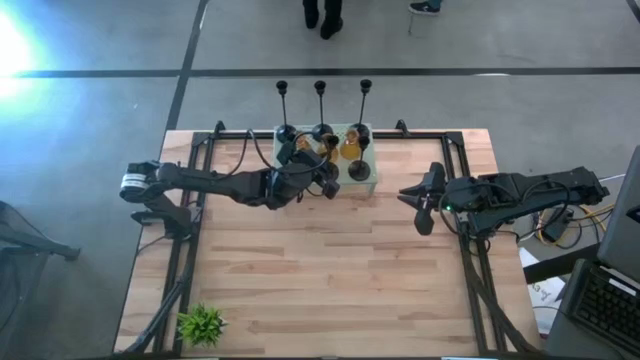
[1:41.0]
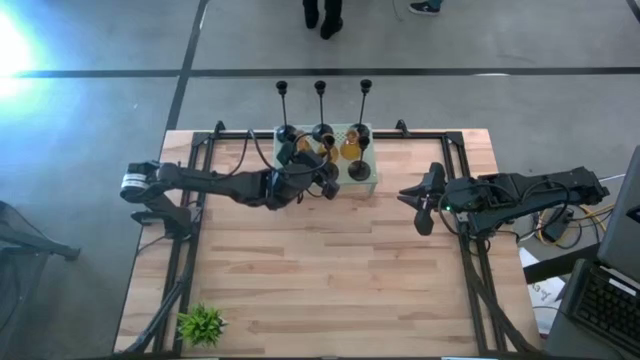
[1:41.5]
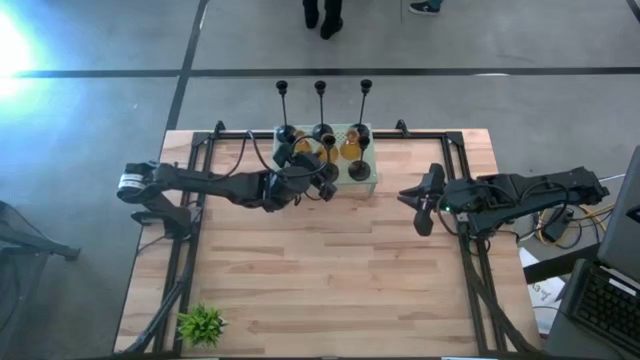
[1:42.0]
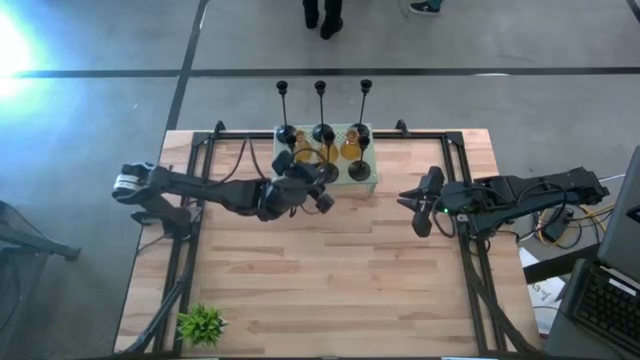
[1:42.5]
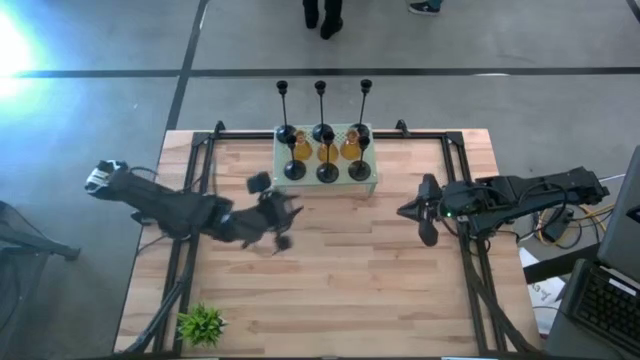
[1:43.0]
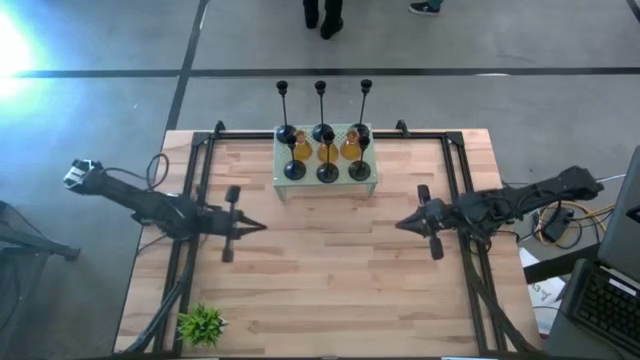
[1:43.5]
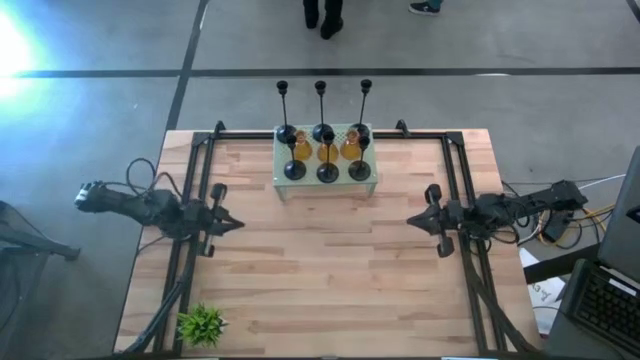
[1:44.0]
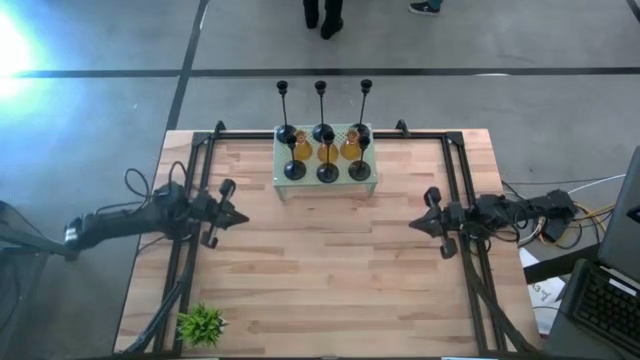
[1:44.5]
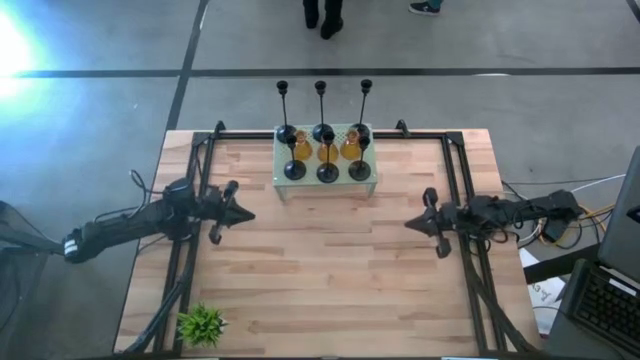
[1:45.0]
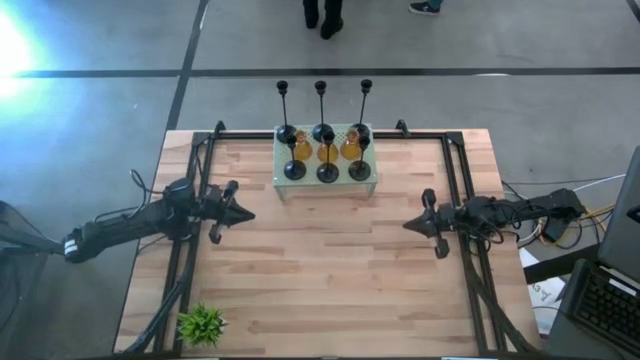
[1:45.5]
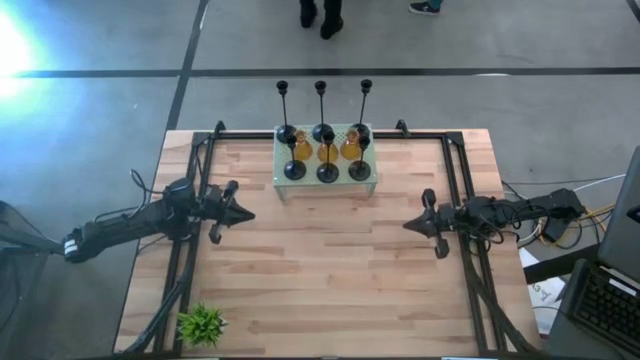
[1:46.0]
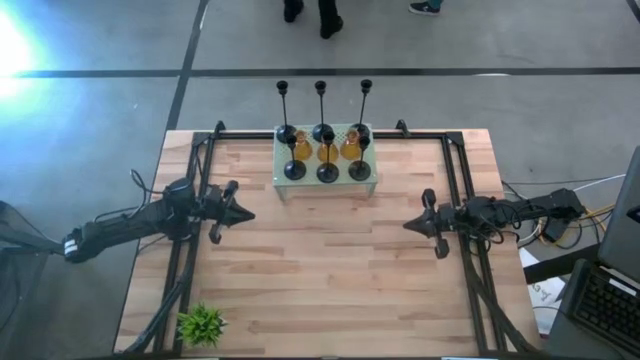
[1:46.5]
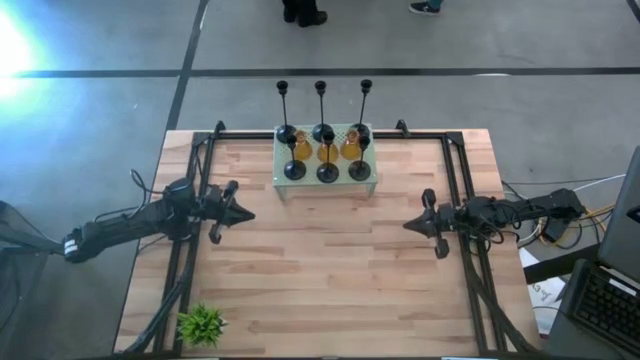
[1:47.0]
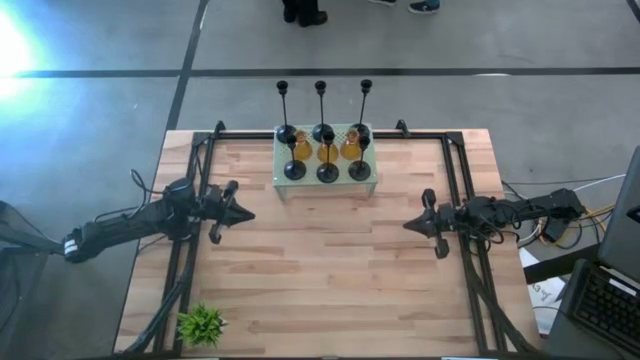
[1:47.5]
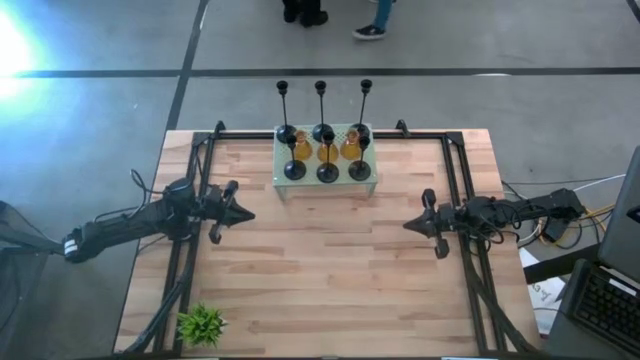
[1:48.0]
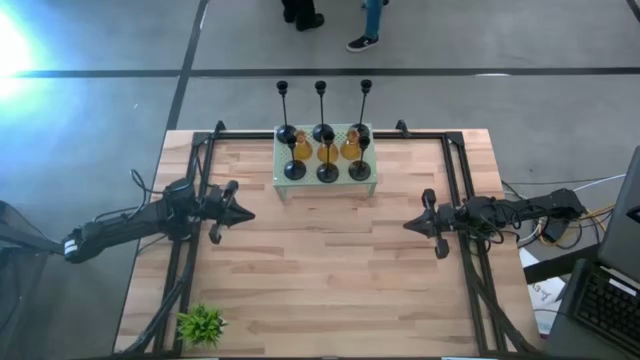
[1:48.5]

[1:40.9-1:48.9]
Task: Pick & Place candle stick holders
Return to Home Position

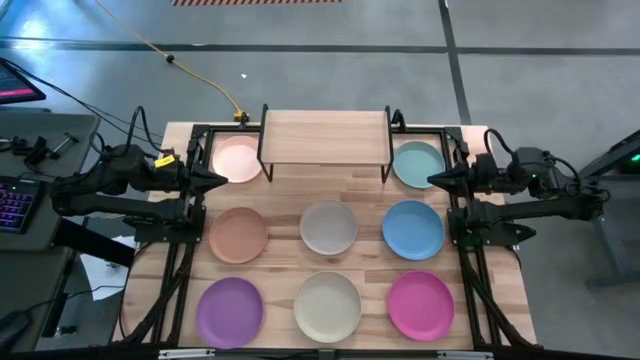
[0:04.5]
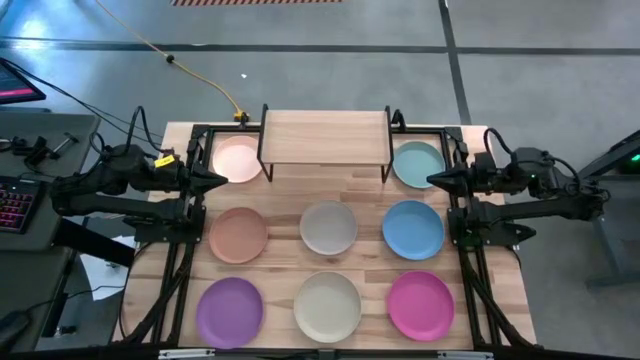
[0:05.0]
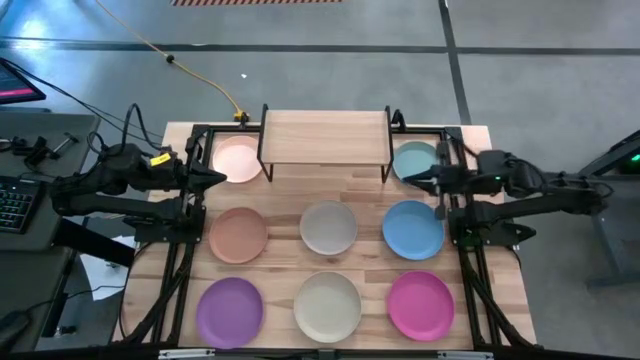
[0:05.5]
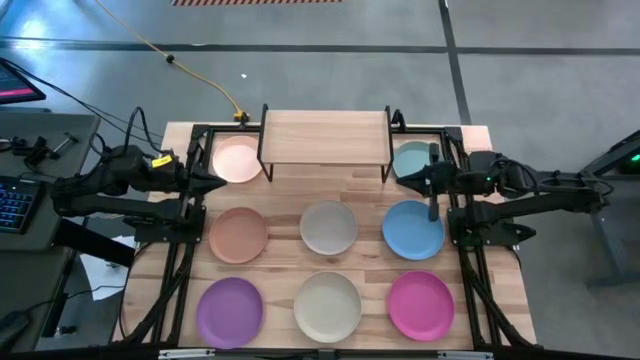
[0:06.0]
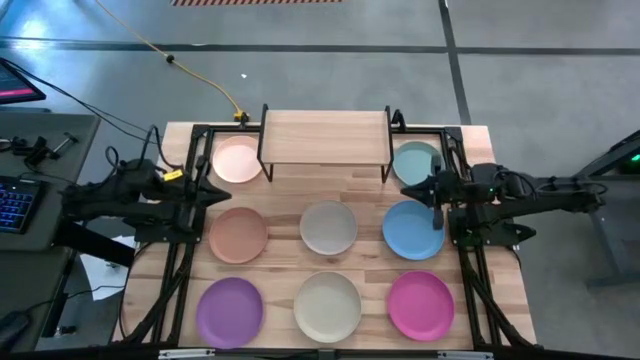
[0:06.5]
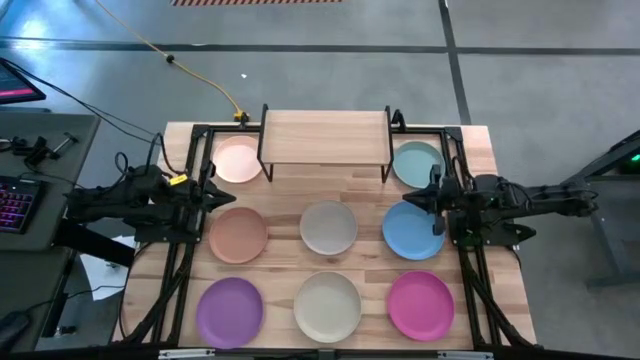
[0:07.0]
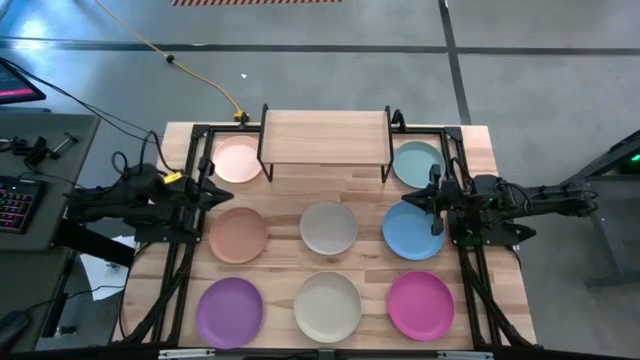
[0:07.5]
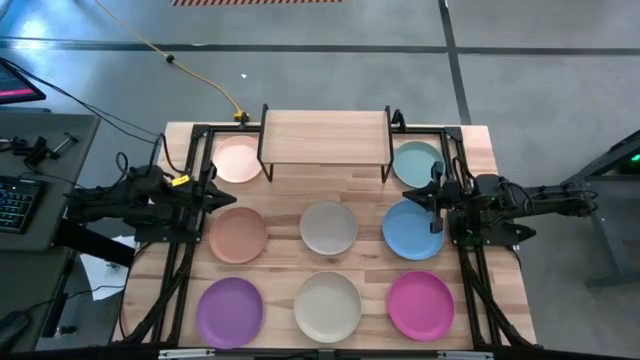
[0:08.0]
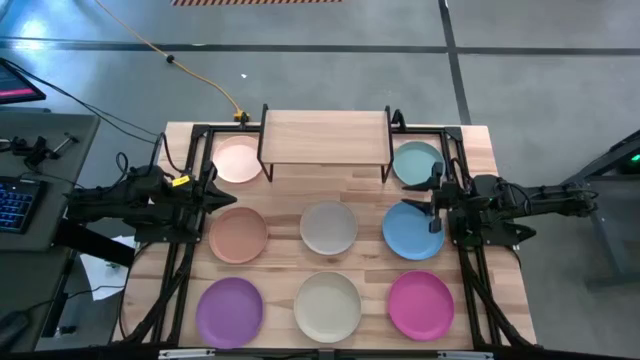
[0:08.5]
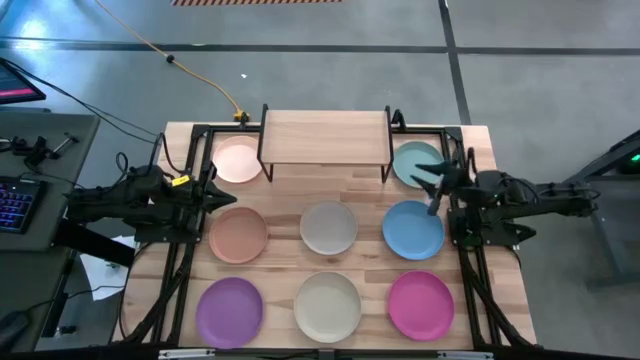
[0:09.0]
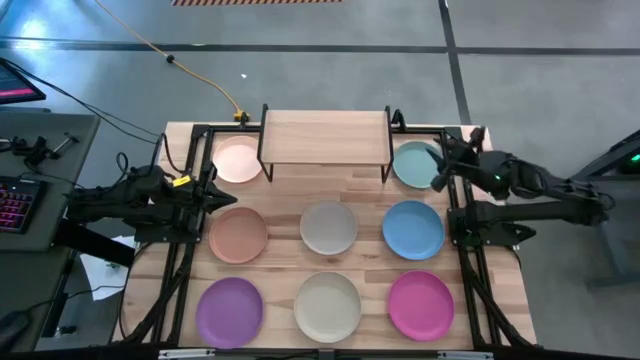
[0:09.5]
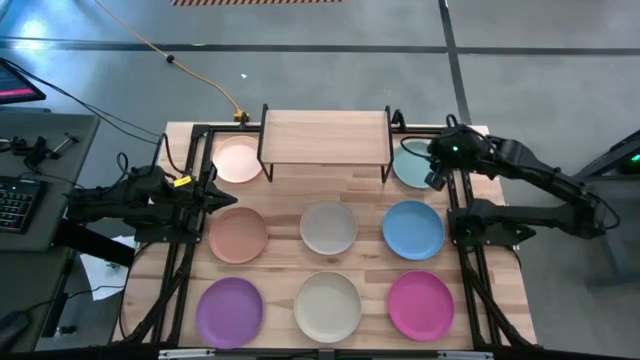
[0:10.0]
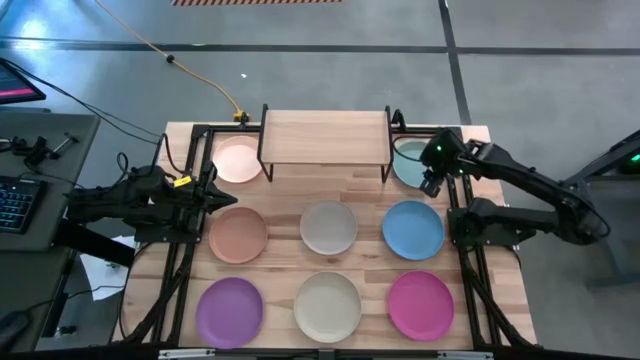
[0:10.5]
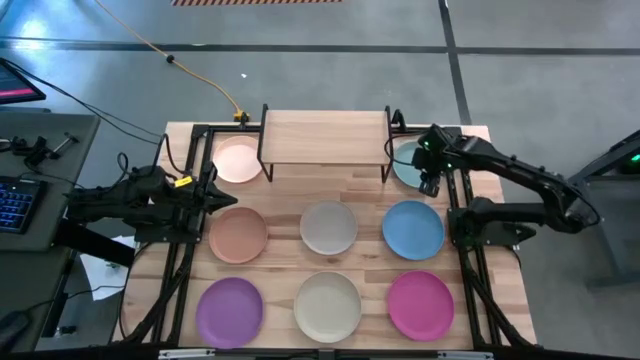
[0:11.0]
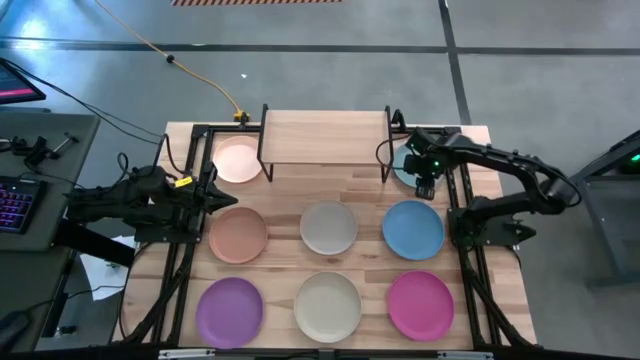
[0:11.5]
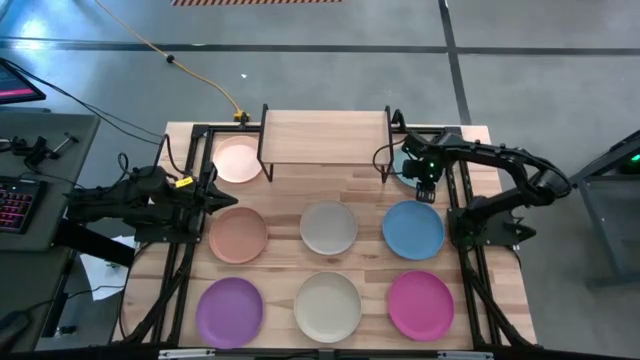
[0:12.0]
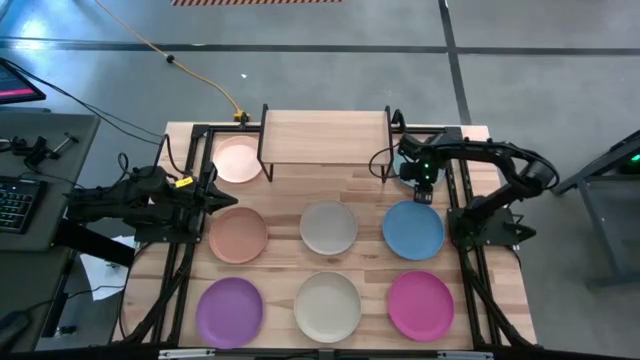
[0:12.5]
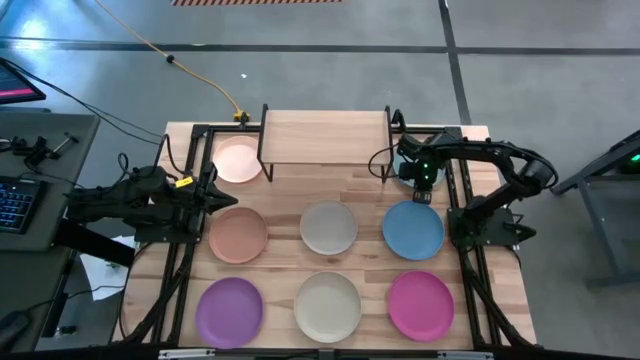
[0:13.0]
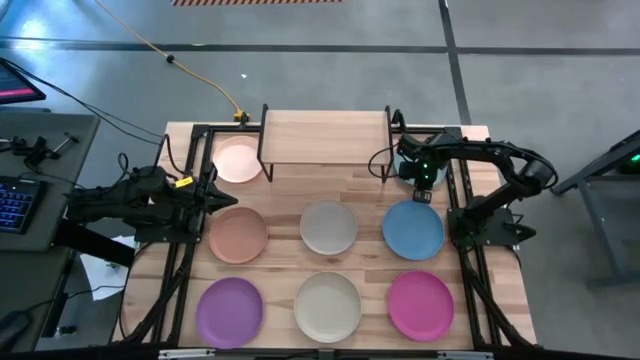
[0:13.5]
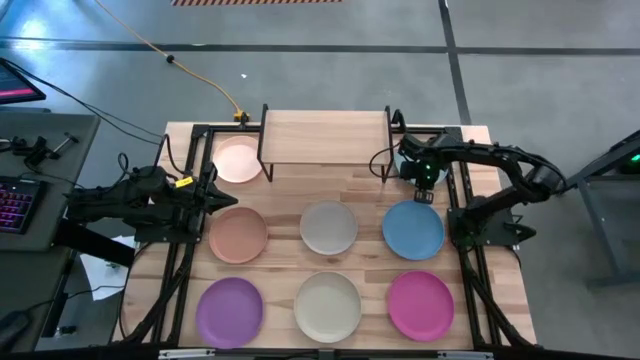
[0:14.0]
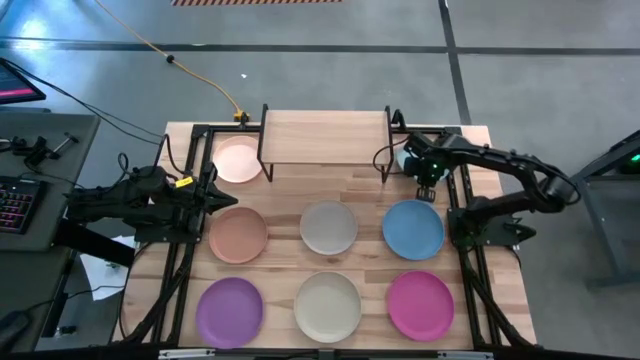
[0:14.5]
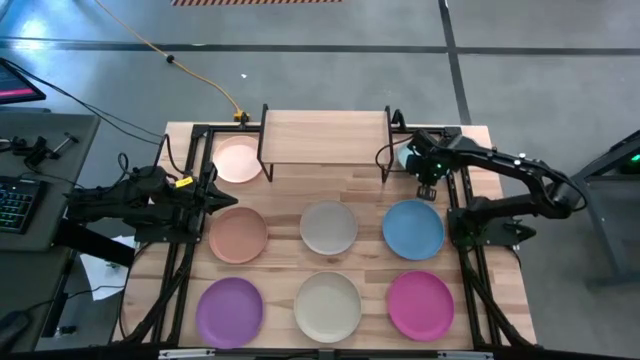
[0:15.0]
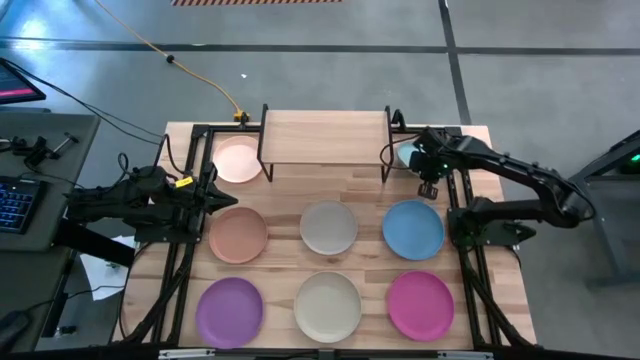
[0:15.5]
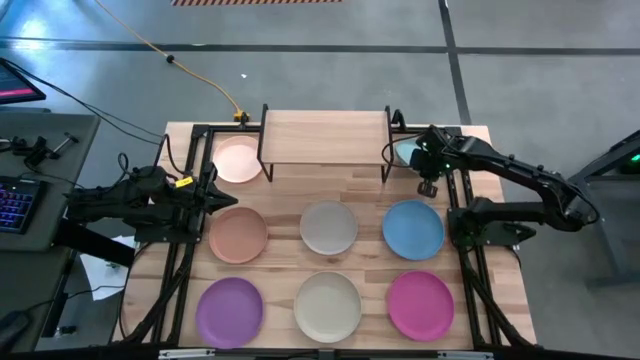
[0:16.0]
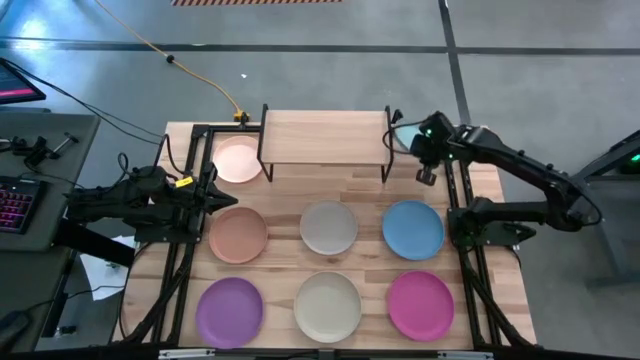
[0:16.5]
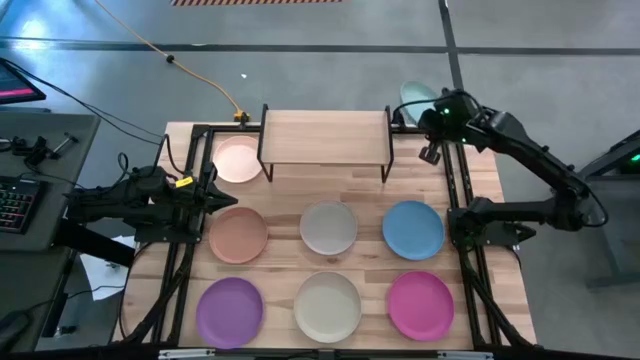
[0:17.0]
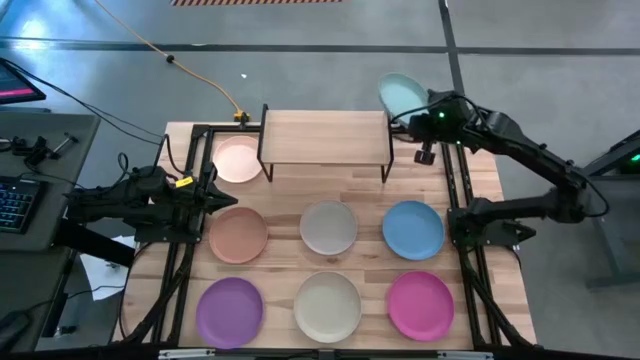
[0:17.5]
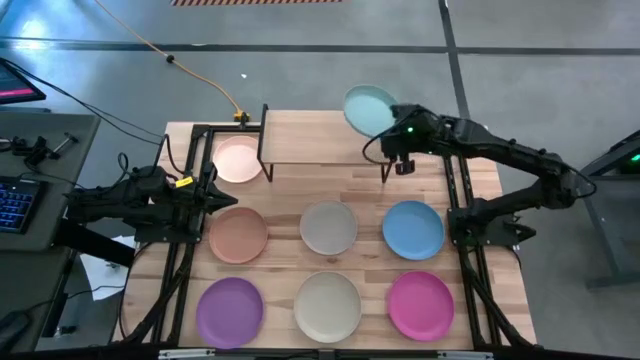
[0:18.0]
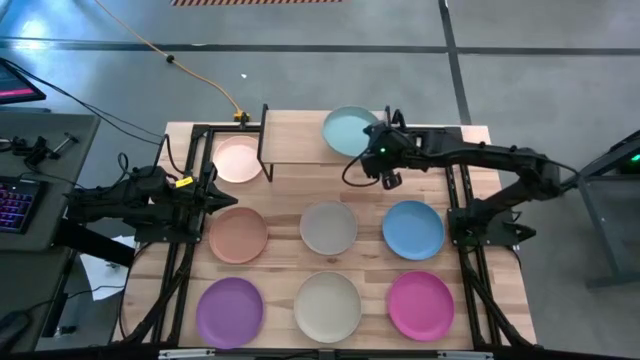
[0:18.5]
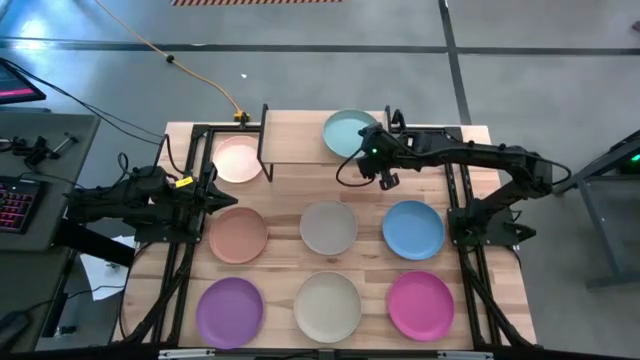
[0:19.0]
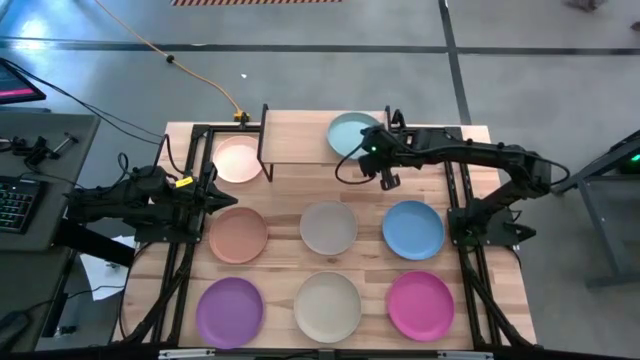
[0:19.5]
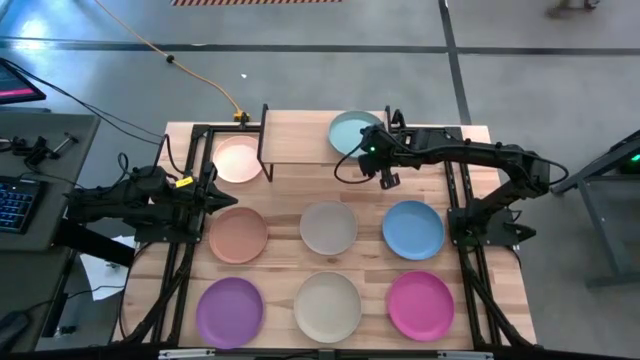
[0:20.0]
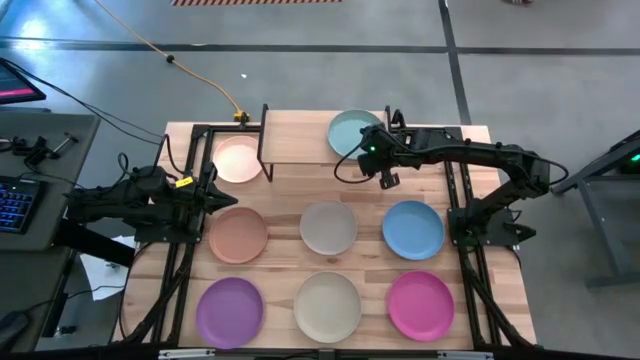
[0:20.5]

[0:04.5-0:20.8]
Task: Place and stack plates onto a shelf
Put the light green plate onto the shelf
